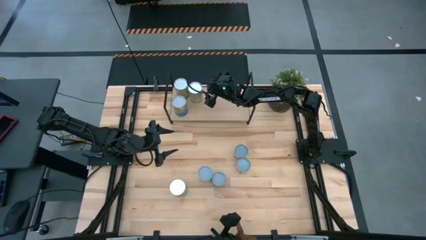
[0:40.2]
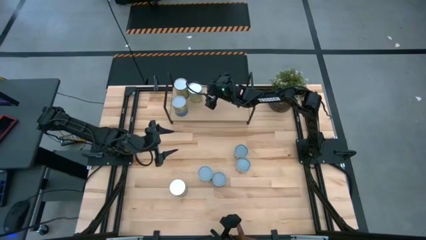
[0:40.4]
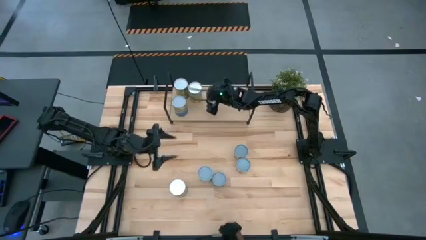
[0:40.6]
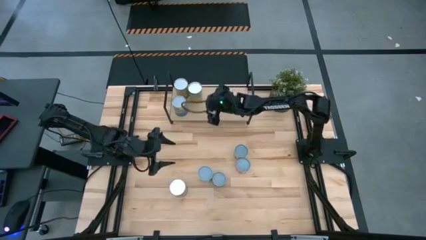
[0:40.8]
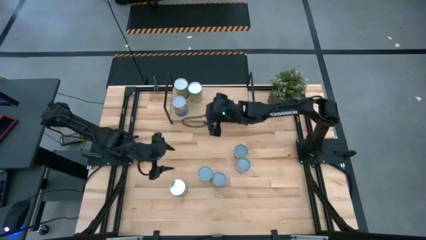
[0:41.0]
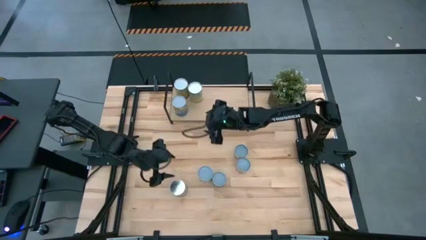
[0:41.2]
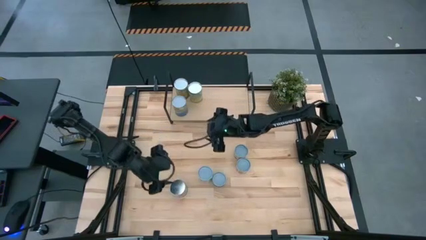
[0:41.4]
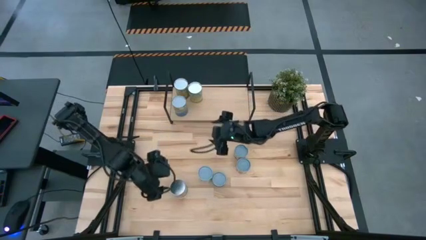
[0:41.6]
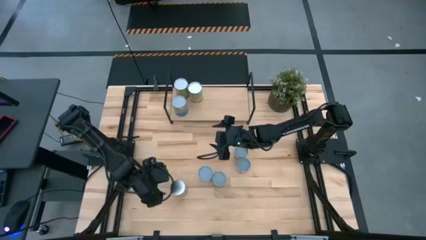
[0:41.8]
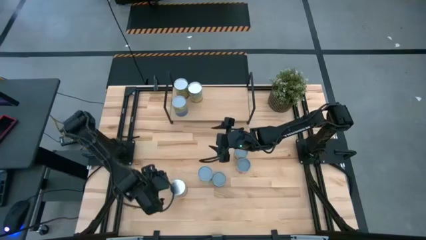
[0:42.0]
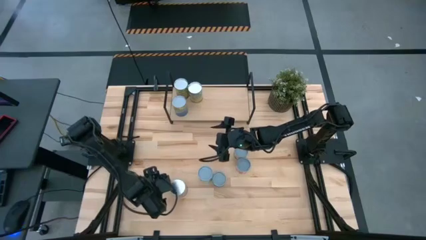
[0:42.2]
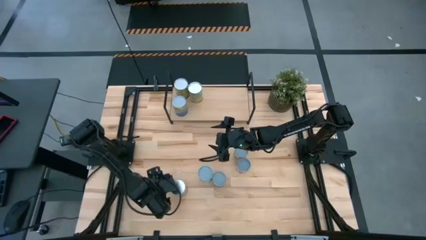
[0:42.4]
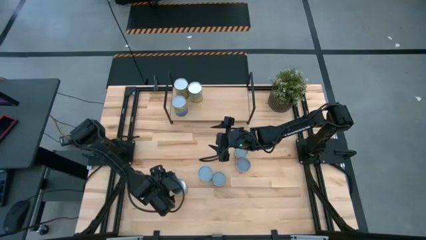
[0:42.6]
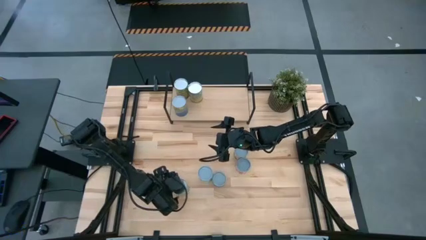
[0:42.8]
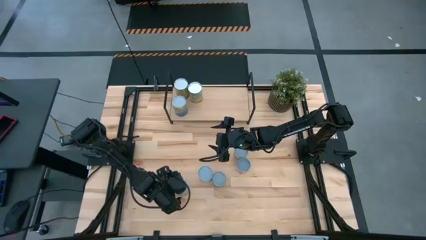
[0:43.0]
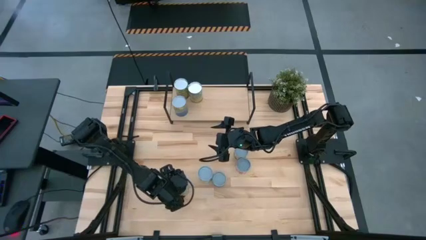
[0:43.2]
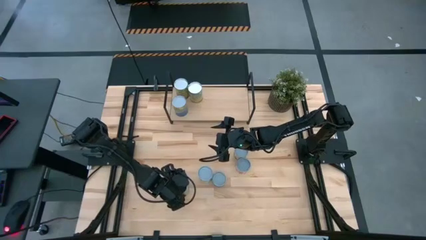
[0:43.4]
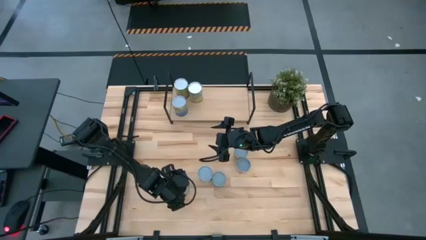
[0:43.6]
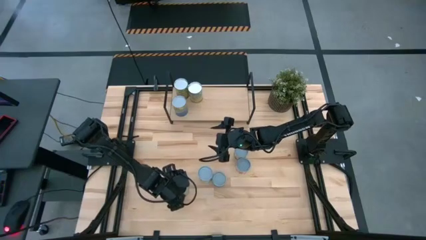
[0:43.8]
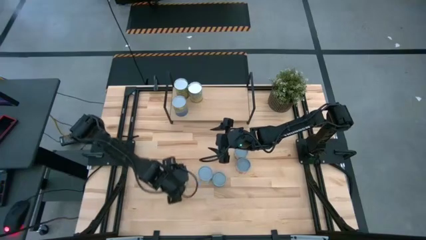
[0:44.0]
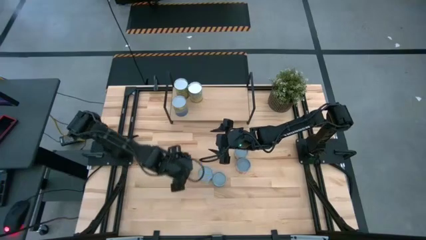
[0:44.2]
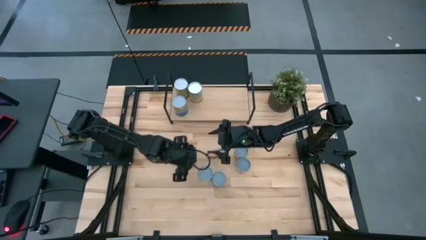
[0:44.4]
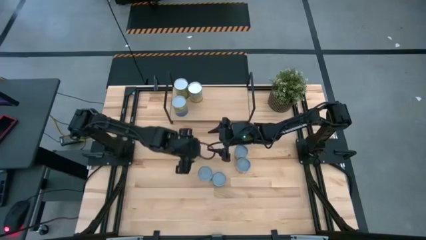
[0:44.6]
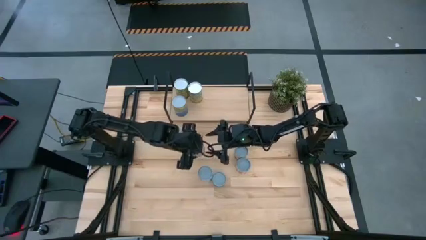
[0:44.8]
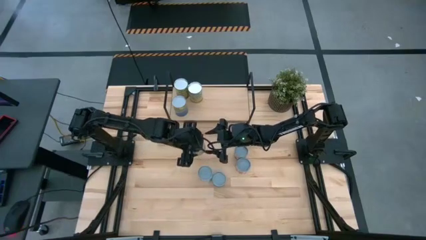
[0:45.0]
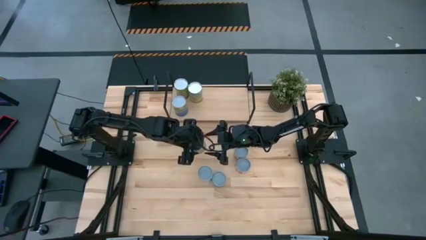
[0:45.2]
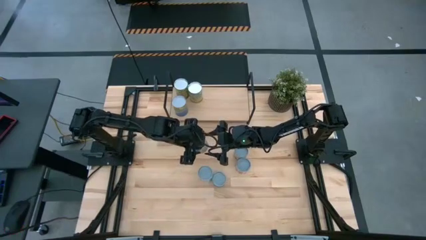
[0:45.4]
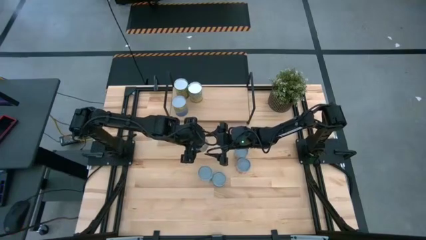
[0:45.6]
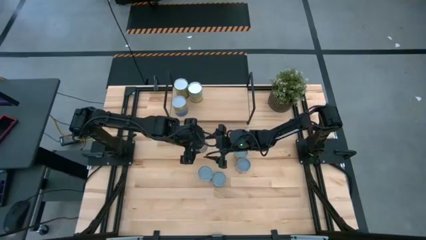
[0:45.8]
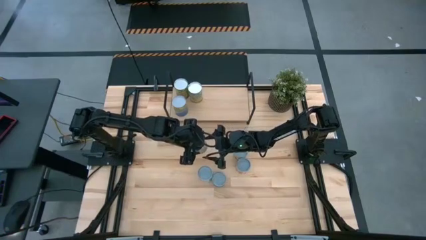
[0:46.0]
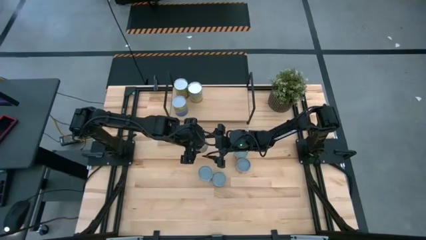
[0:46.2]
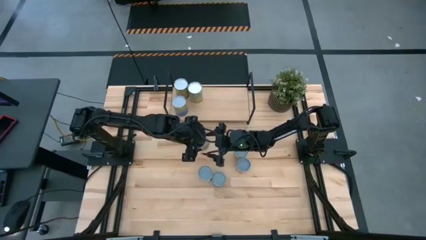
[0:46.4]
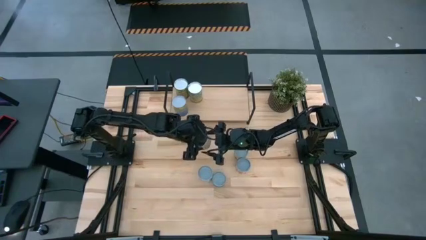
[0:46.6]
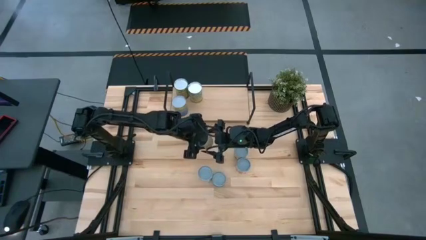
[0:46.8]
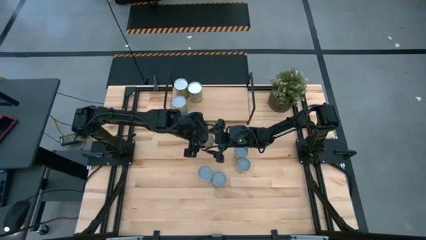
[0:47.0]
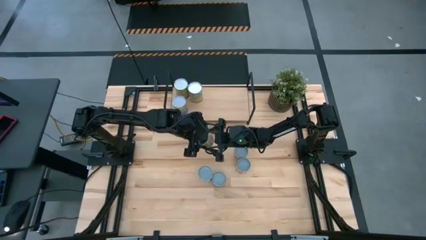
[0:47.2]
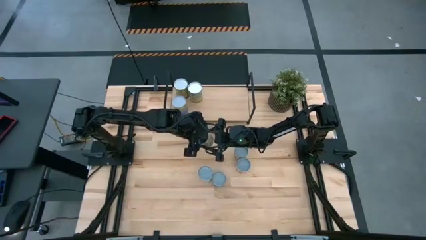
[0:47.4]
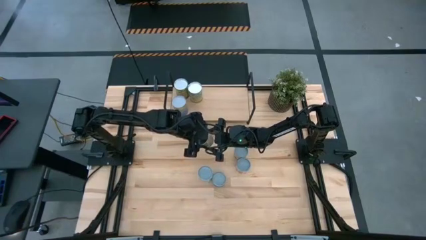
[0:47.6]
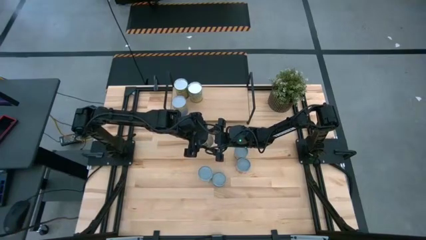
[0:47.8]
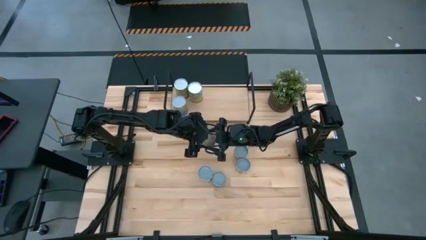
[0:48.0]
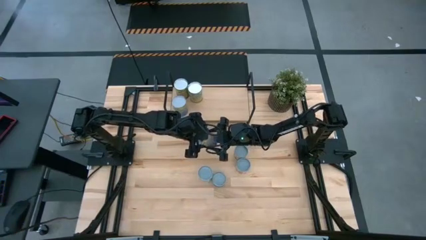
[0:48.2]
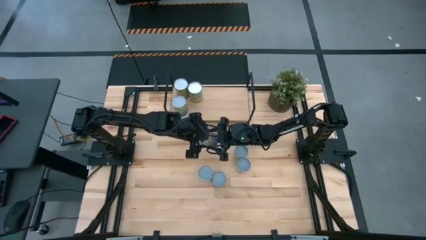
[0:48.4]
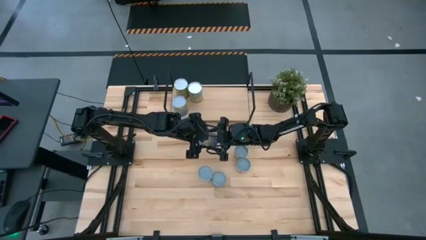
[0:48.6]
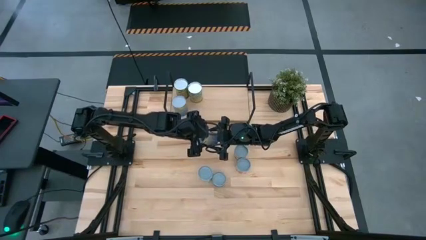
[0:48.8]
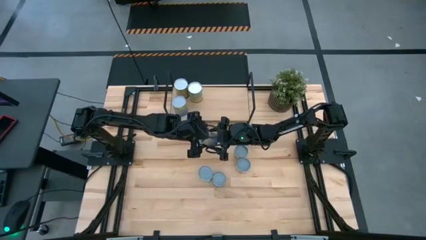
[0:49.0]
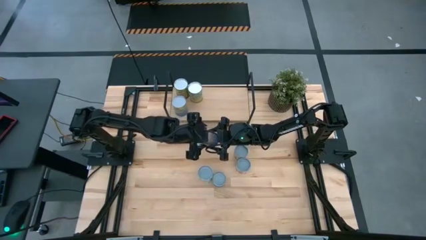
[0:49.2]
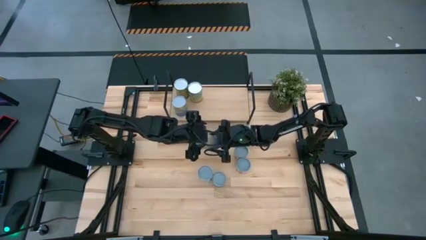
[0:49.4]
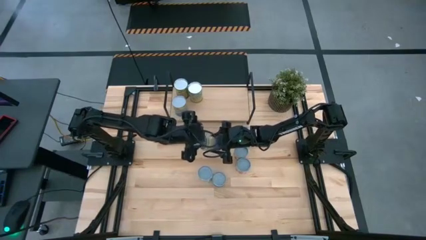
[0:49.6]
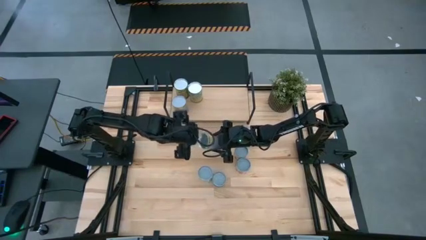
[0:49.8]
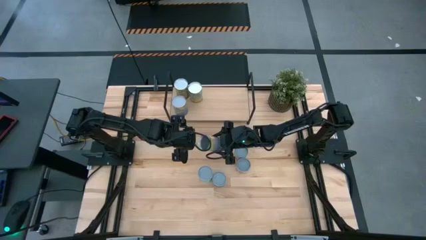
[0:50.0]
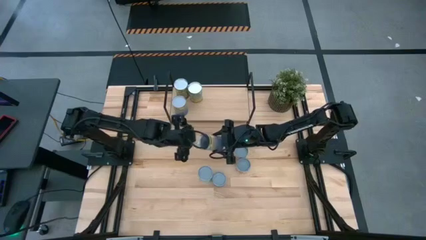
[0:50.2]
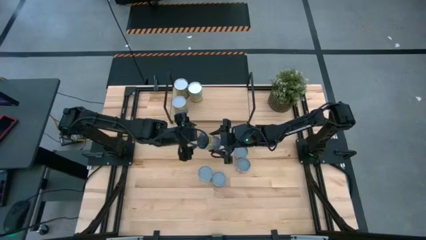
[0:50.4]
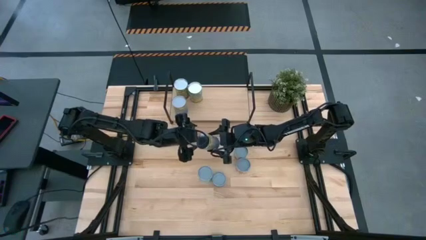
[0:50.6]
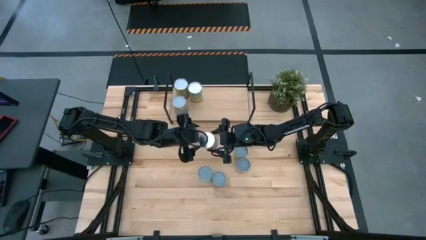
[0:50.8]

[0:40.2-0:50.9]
Task: Pick and place cans onto a shelf
Put the canned peaches on the shelf

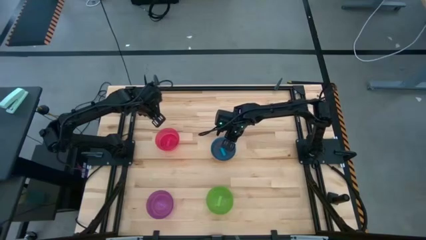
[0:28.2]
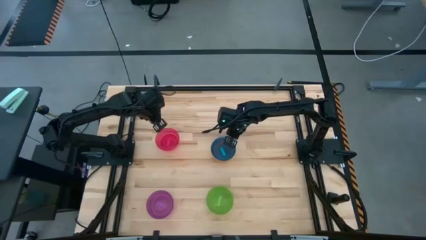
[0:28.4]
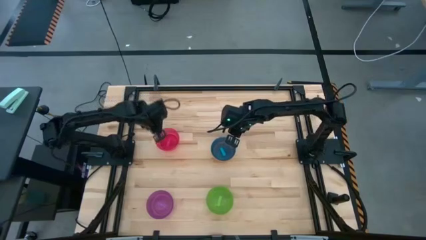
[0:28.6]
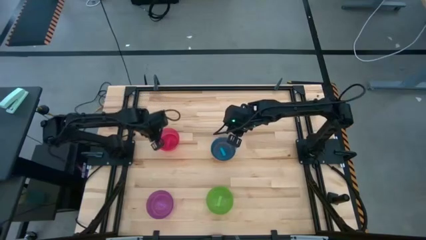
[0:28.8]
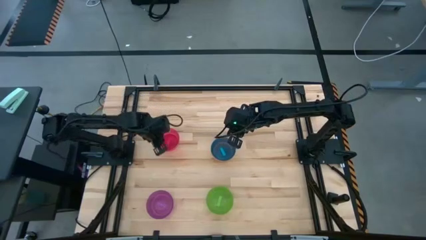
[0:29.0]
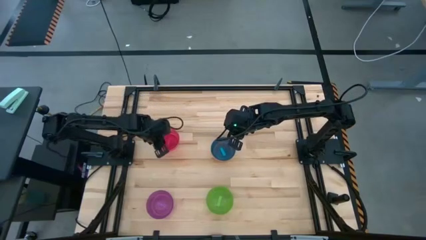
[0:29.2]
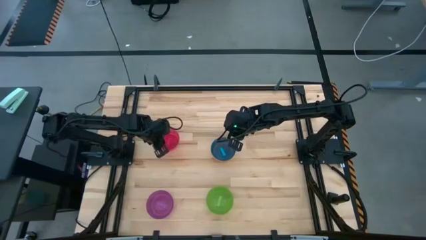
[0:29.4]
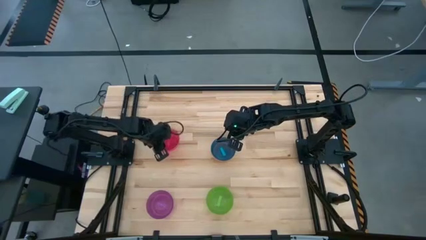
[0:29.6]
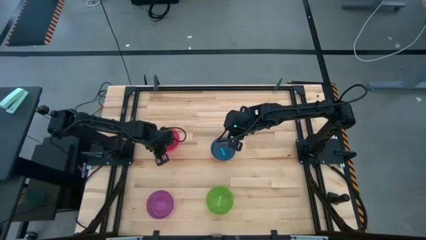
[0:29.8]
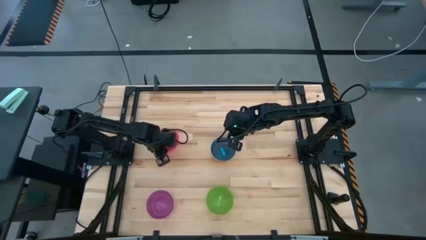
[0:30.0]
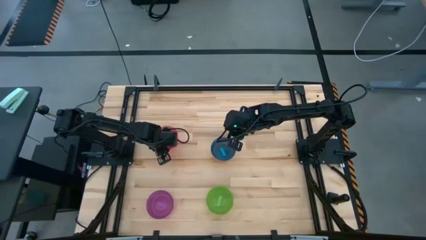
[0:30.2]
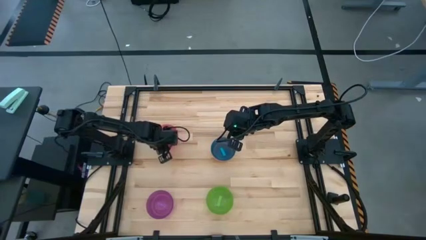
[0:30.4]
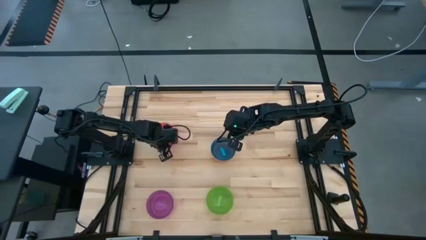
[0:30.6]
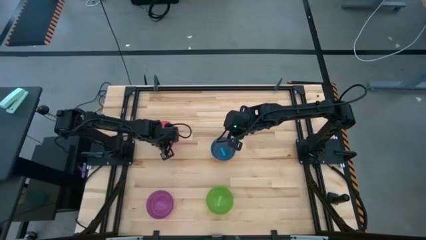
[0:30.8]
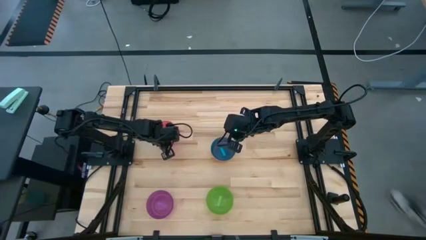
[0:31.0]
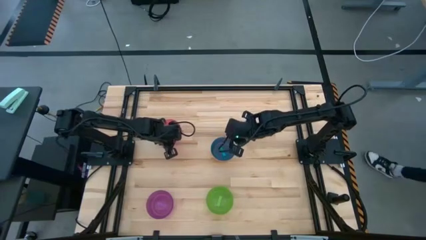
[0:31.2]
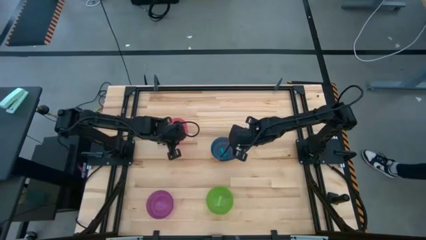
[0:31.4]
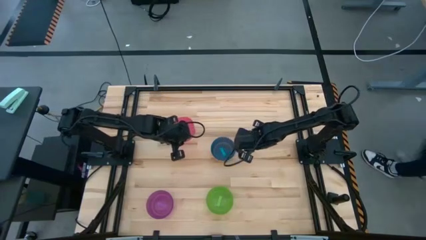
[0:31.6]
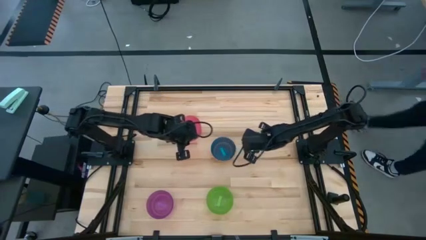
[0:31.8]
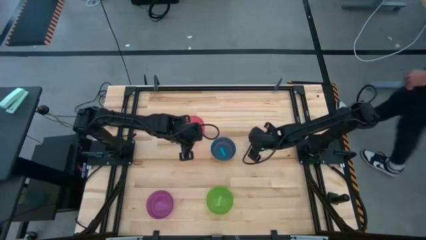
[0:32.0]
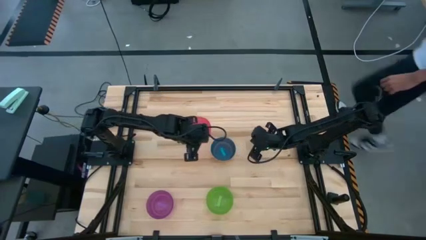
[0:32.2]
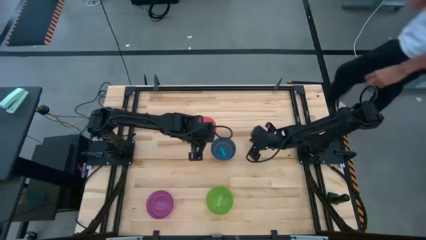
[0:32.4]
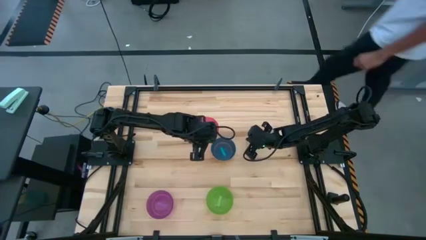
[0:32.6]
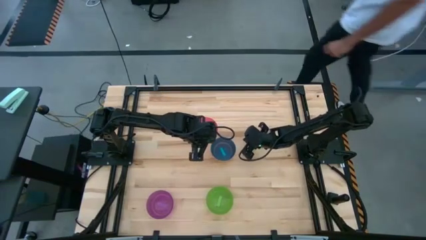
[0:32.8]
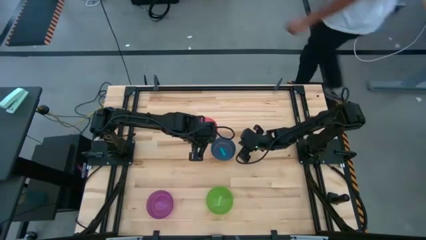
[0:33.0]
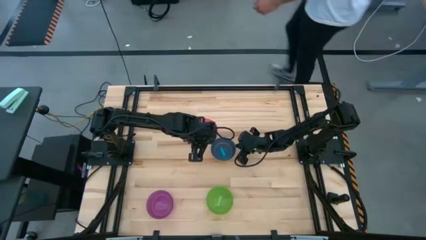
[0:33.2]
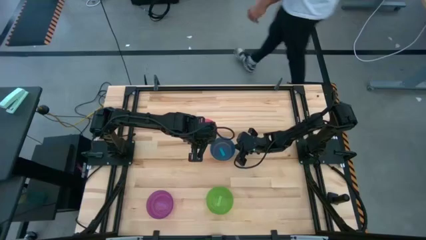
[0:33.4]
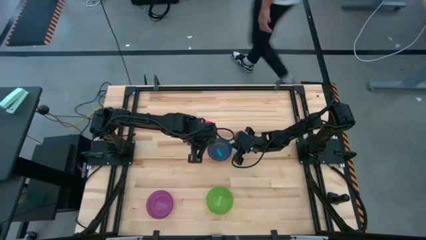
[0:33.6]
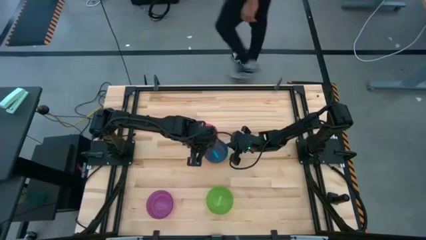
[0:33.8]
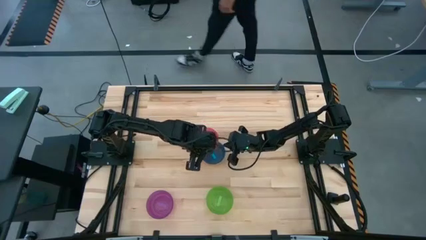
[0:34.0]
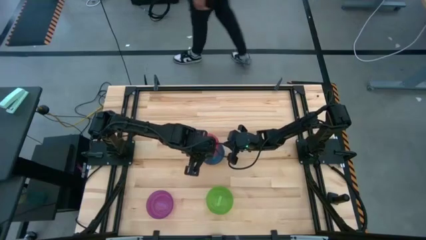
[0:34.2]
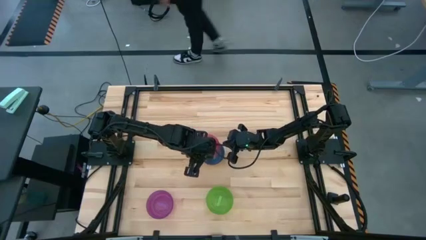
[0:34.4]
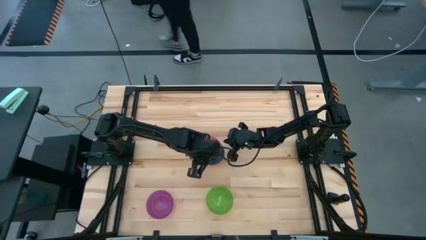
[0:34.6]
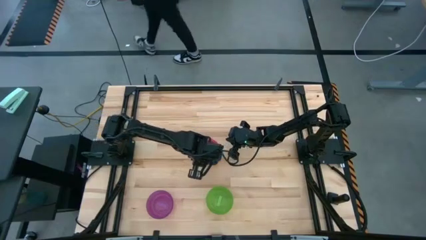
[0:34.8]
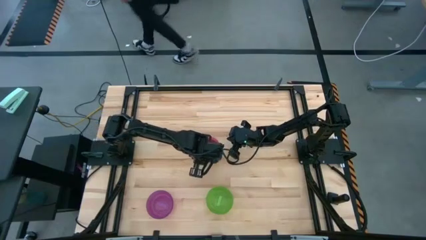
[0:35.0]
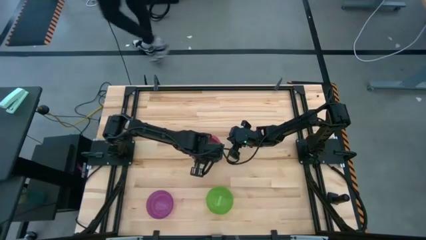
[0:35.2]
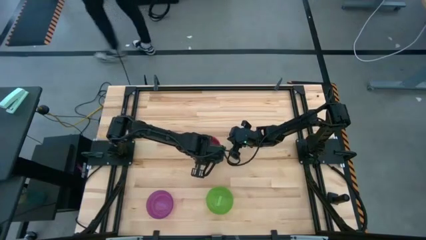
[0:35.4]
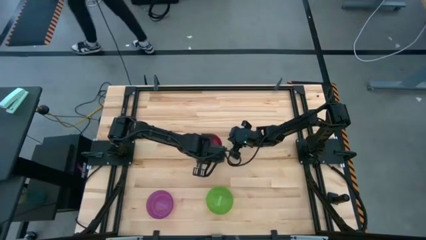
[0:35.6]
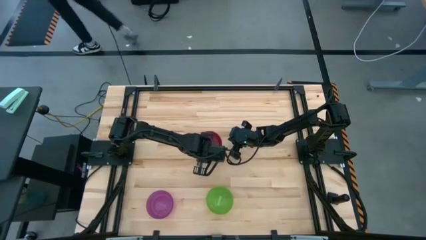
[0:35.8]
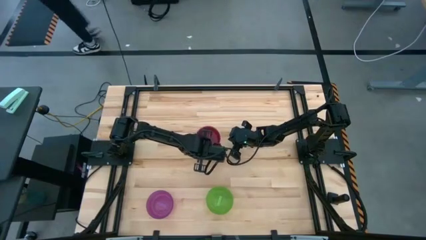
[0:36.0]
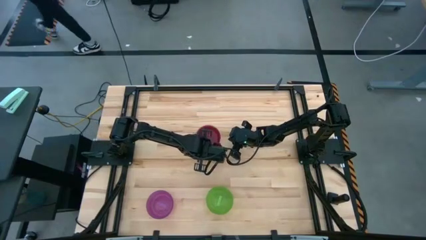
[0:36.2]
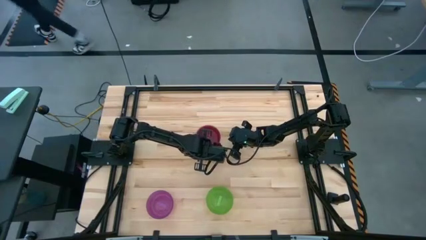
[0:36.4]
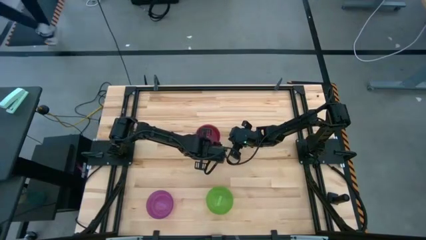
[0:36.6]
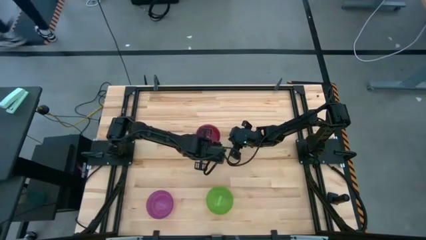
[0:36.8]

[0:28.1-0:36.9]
Task: Nest bowls inside each other
Stack the red bowl on top of the blue bowl
